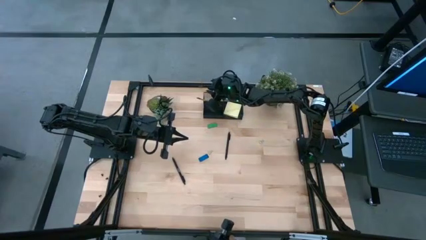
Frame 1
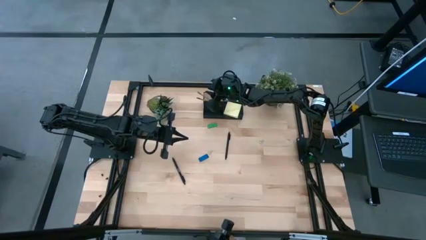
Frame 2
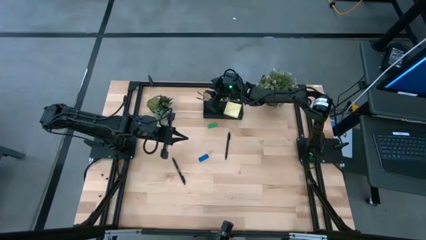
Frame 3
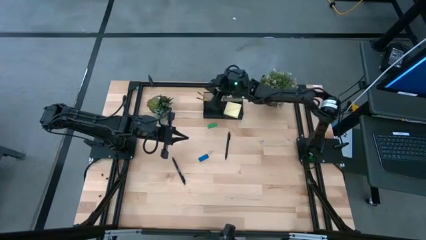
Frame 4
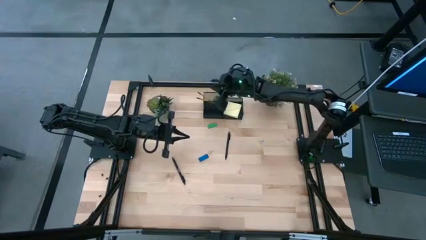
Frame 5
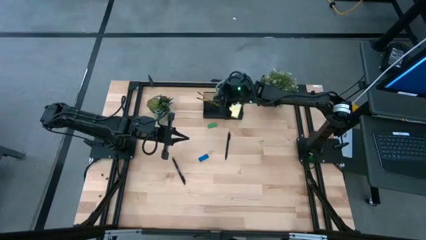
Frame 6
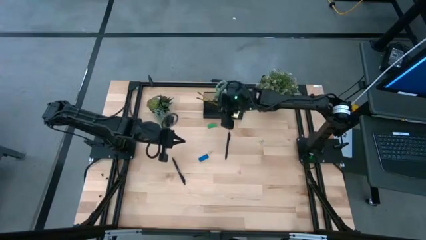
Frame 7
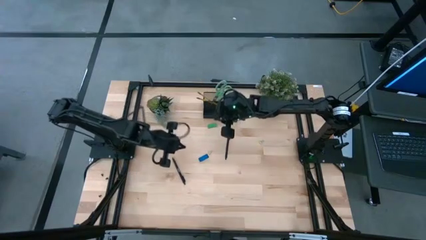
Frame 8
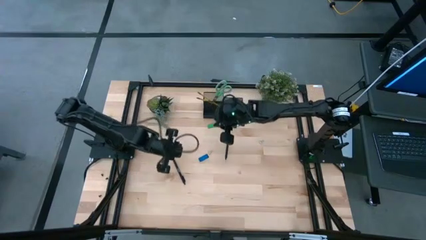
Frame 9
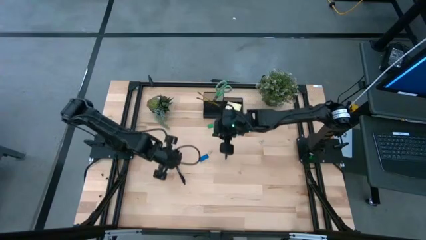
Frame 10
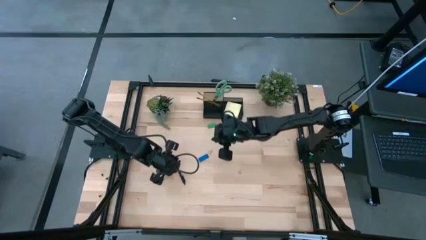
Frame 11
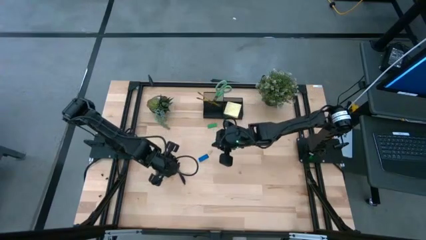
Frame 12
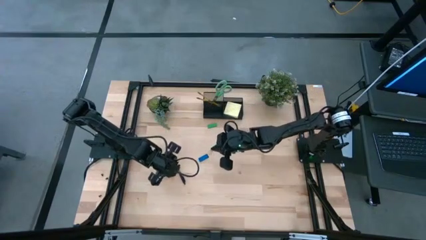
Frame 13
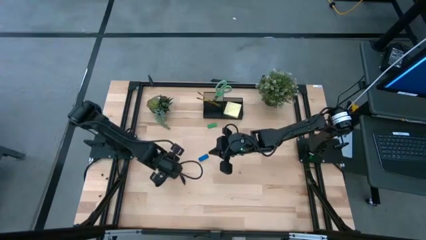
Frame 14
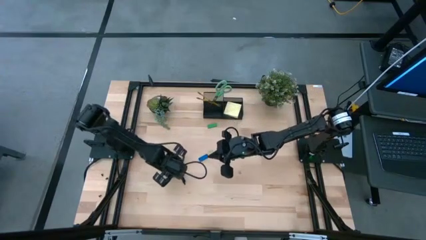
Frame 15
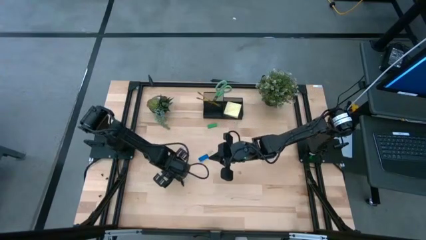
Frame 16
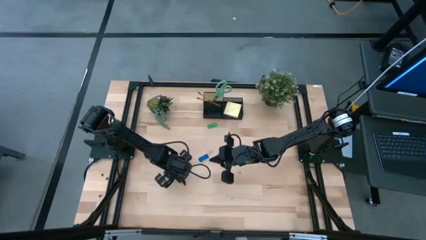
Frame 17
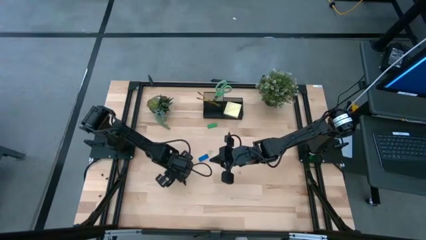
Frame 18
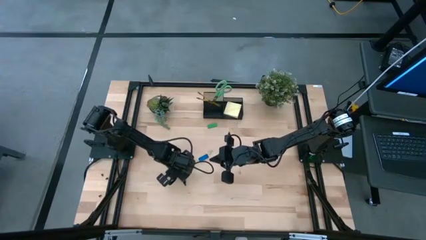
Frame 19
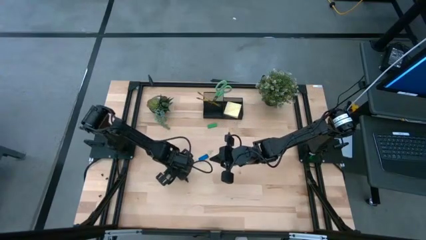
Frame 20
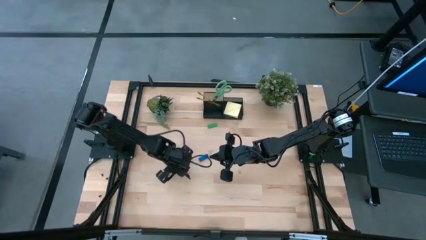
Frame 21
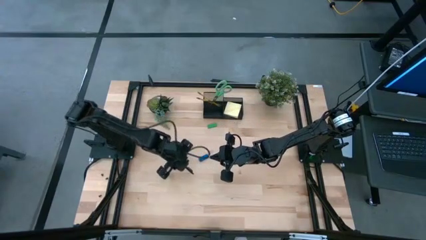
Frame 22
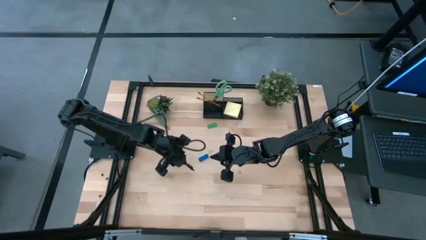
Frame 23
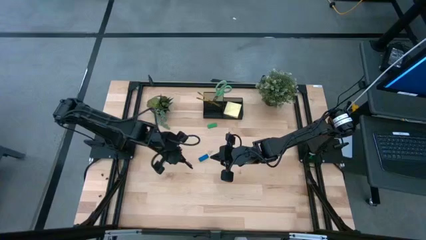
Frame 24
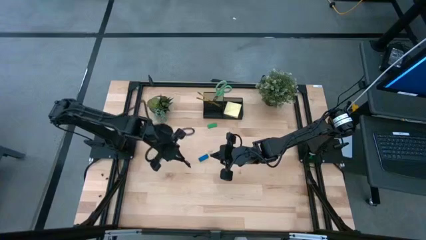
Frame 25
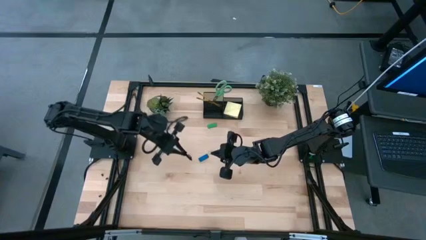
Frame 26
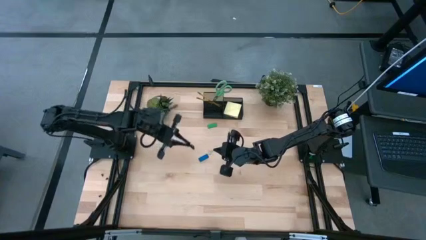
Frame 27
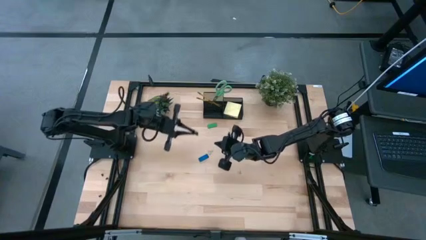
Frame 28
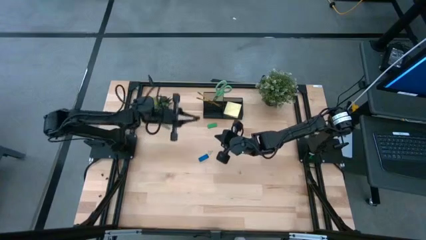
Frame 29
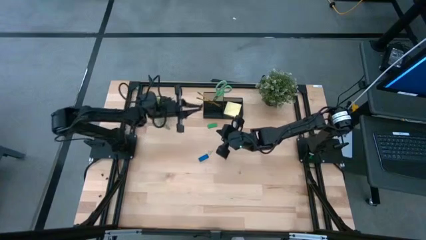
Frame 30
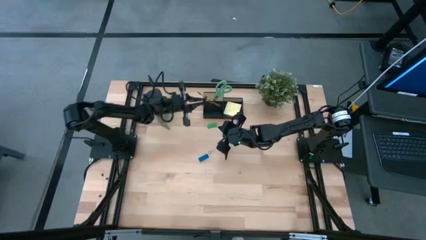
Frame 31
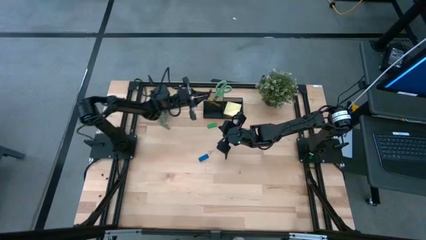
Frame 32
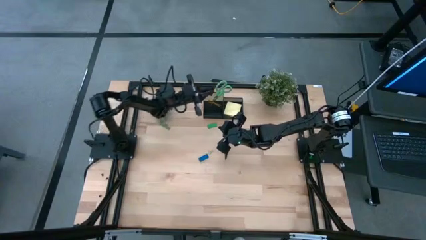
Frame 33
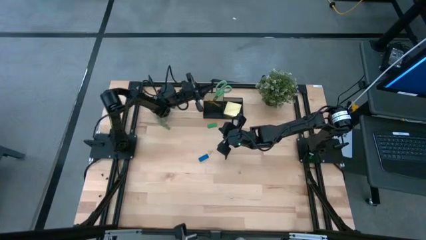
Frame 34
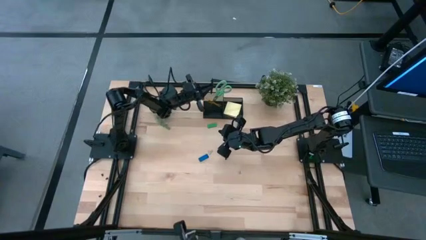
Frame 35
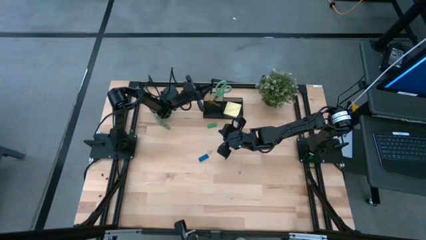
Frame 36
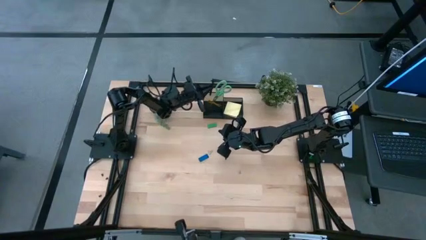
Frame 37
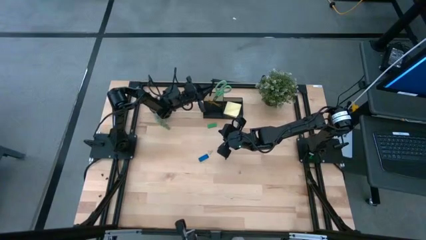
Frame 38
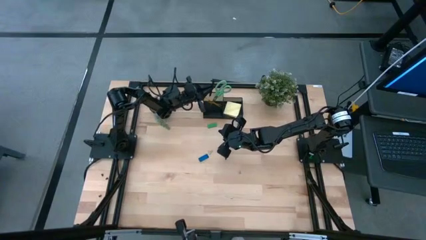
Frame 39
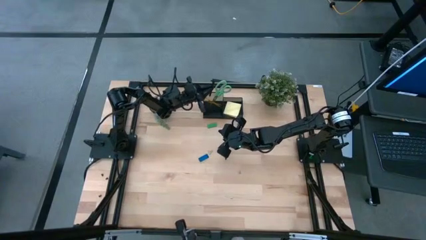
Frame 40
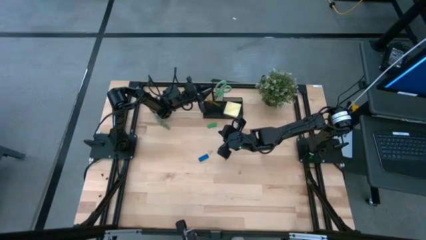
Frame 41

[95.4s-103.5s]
Task: Pick and place office supplies into organizer
Put the black pen into the black desk organizer

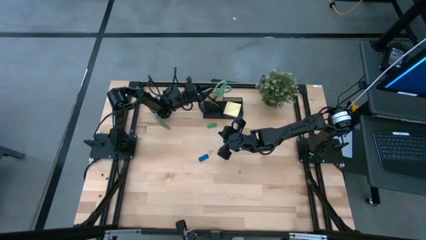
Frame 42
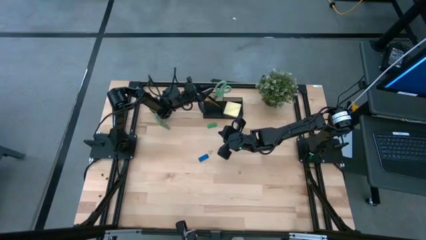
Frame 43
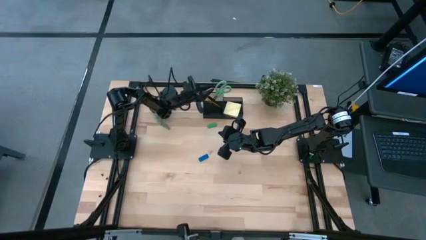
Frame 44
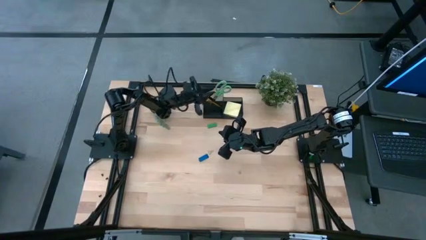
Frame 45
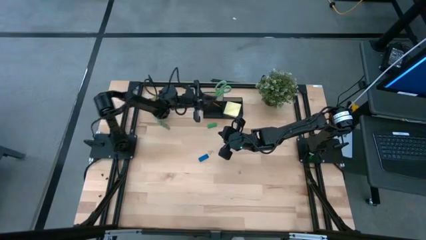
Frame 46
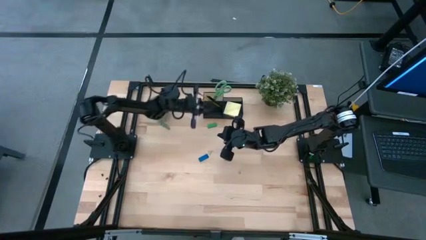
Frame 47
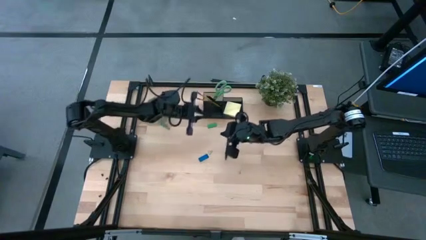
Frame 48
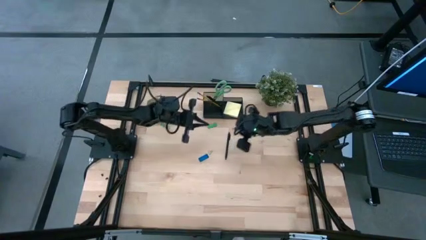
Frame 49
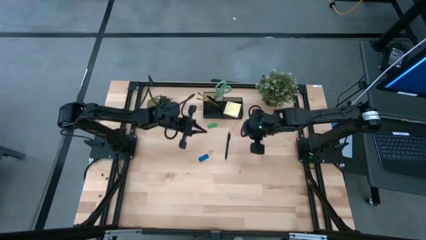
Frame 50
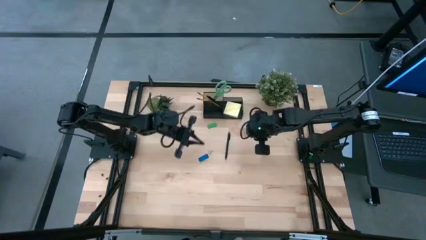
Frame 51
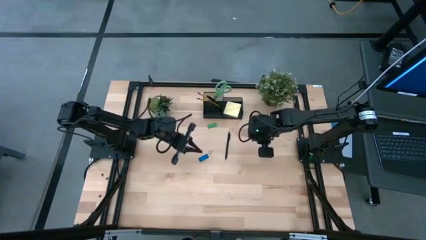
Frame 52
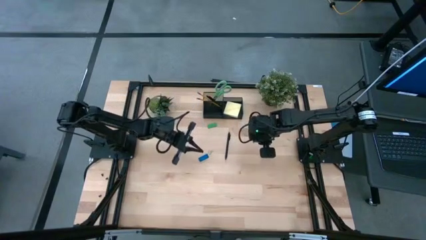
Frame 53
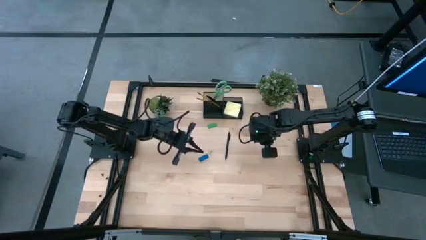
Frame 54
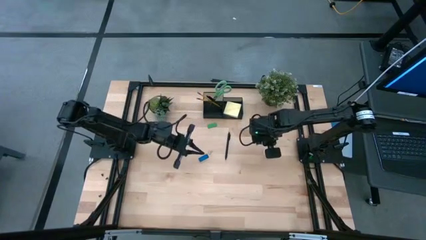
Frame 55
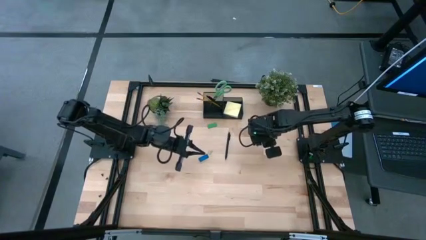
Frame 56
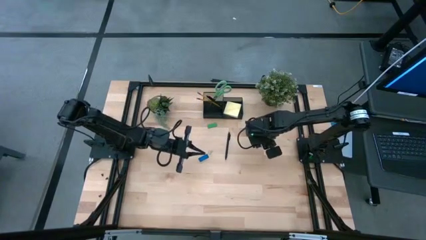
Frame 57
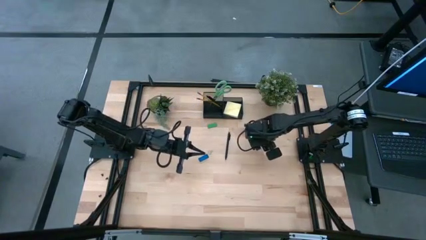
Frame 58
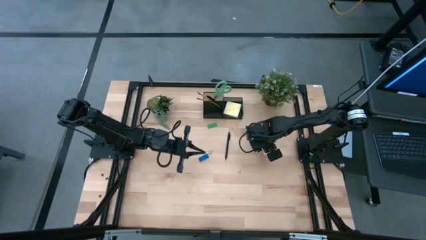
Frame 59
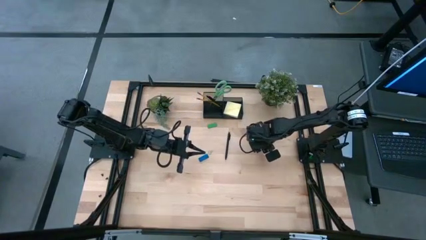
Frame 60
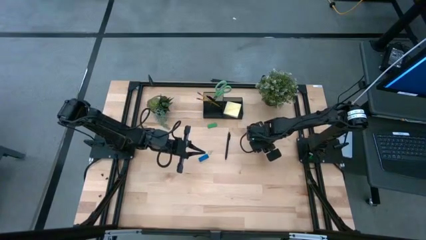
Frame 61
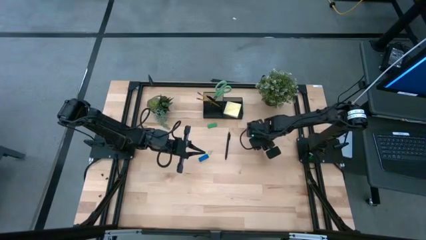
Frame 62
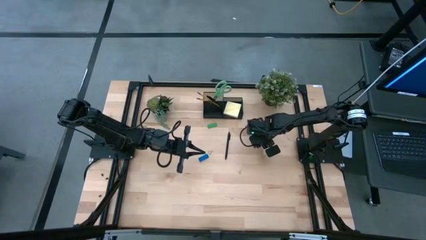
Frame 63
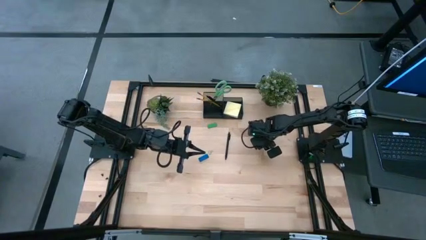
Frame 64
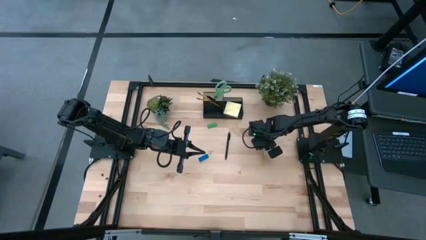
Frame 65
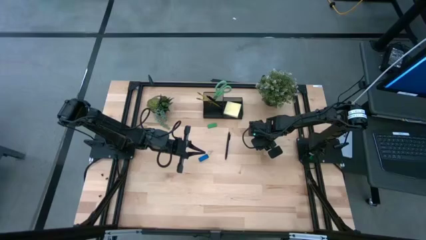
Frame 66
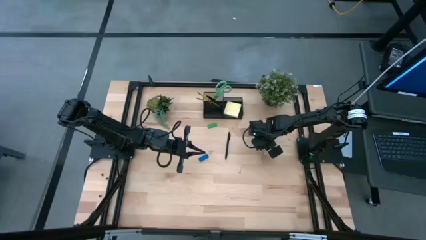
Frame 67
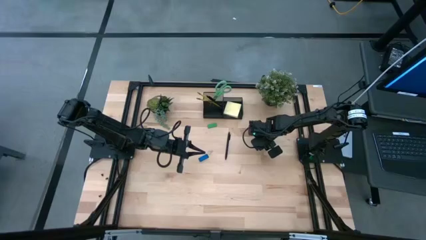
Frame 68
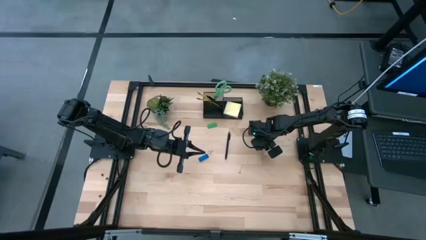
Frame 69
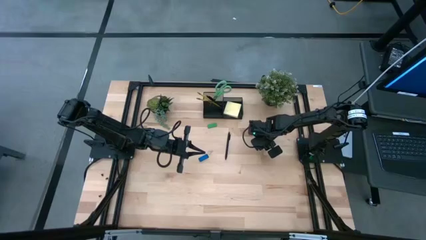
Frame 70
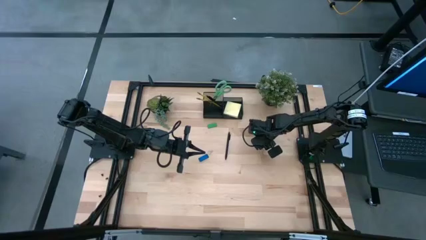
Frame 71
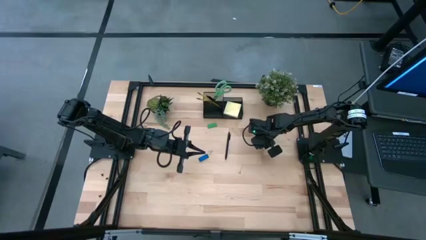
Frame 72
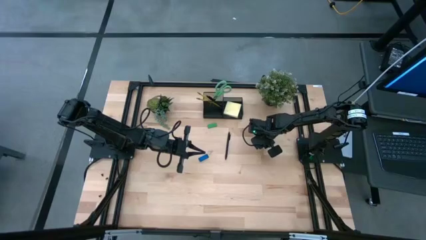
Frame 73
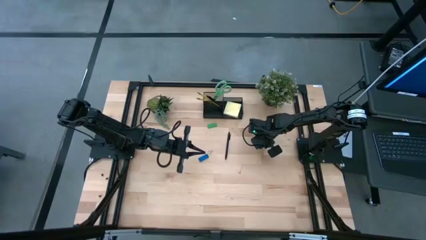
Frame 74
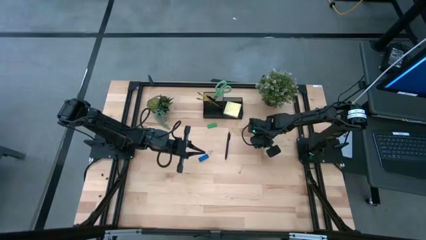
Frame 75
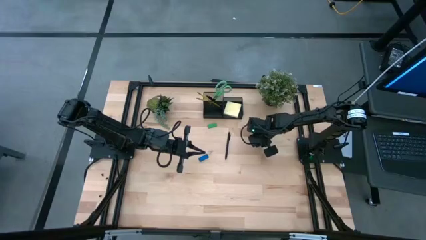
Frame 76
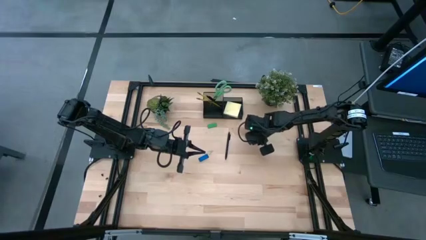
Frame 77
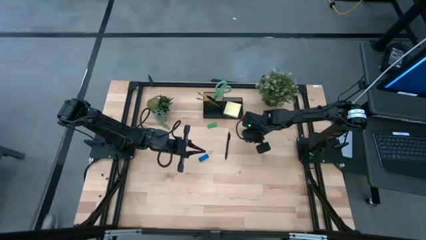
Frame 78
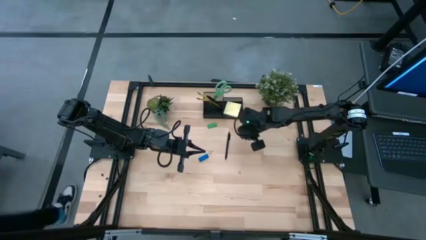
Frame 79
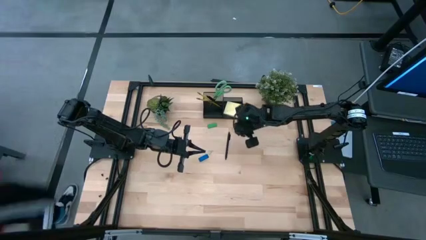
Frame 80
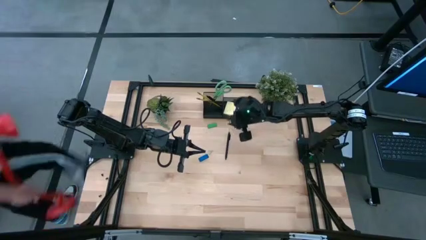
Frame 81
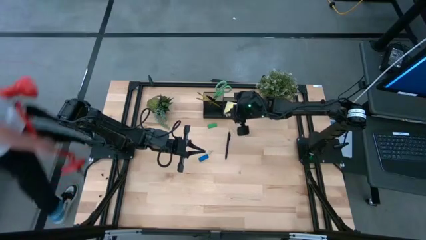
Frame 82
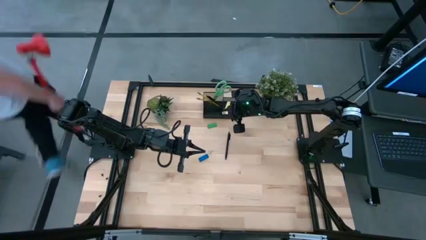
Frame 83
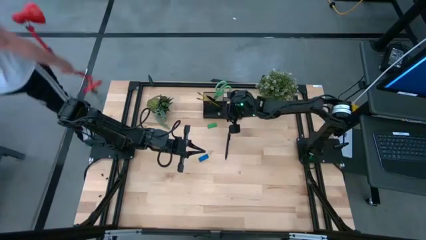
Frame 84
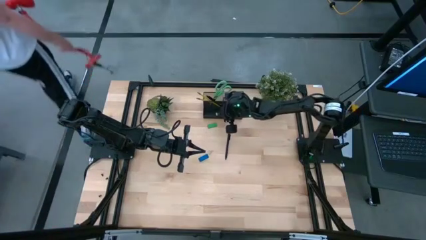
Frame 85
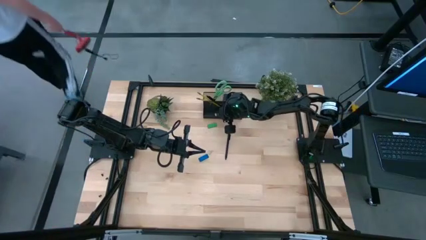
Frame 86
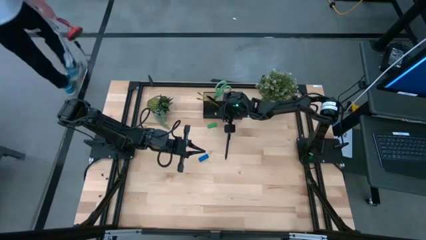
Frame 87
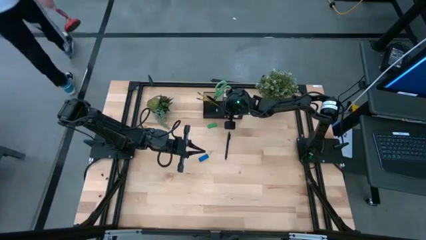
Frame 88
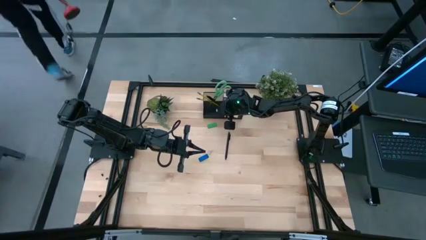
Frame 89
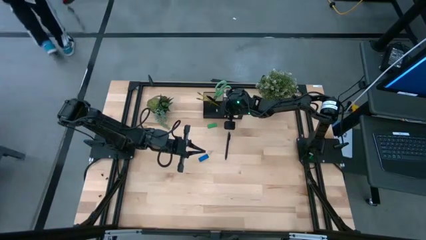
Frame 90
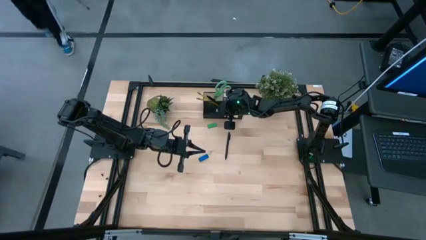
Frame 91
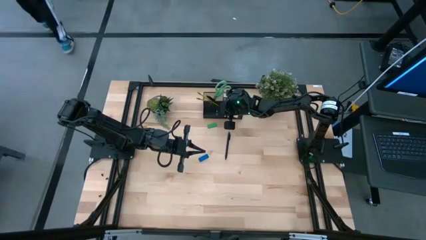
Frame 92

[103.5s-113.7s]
Put the binding clip into the black desk organizer
